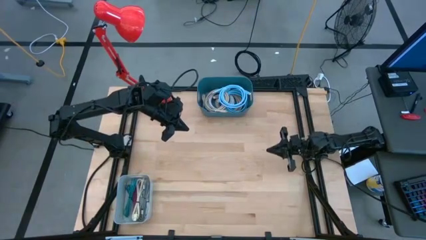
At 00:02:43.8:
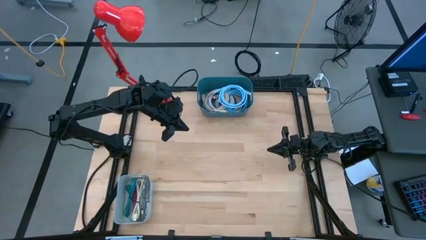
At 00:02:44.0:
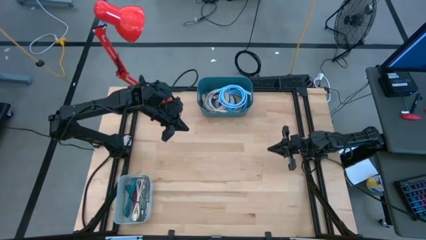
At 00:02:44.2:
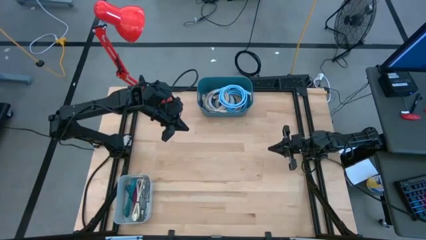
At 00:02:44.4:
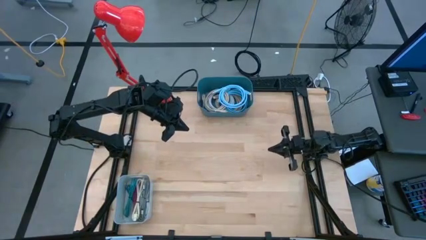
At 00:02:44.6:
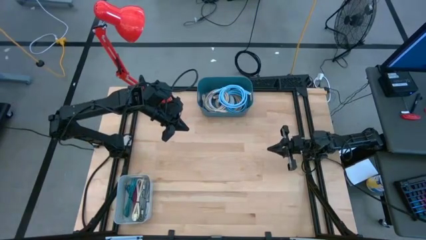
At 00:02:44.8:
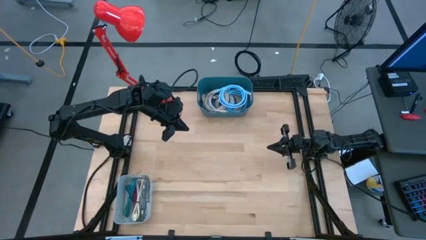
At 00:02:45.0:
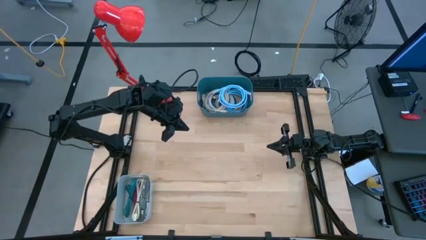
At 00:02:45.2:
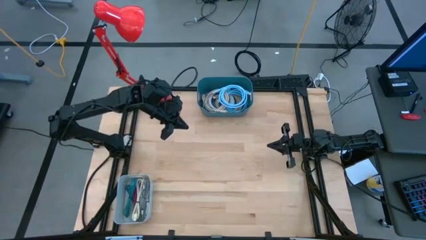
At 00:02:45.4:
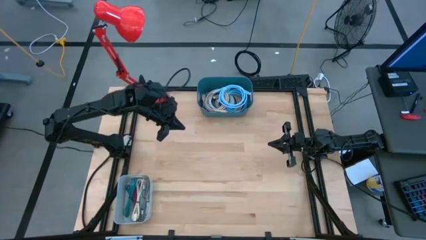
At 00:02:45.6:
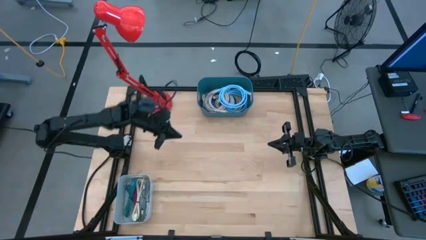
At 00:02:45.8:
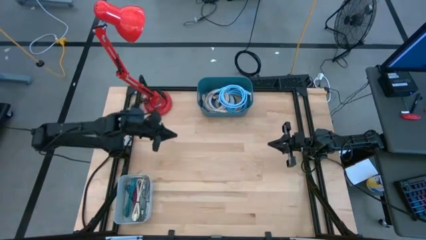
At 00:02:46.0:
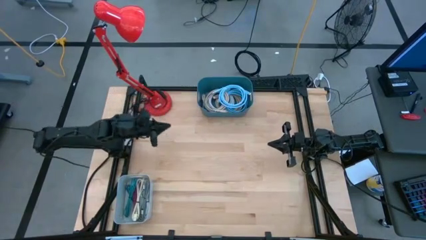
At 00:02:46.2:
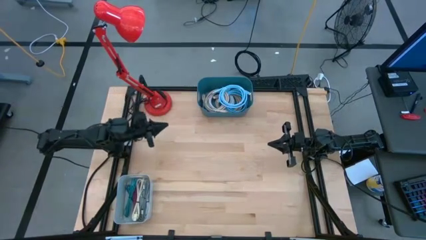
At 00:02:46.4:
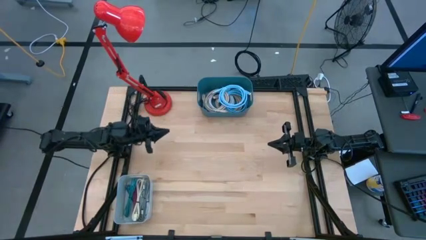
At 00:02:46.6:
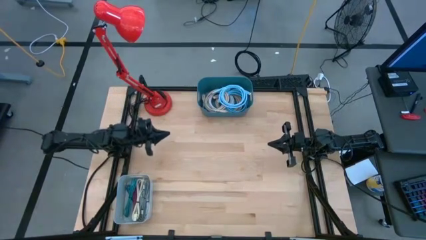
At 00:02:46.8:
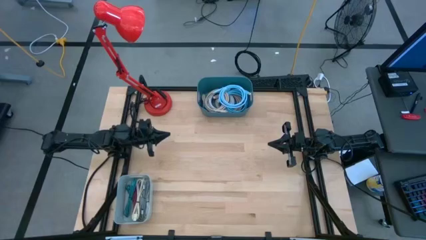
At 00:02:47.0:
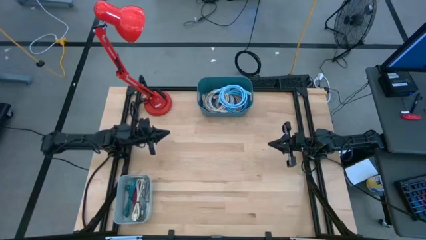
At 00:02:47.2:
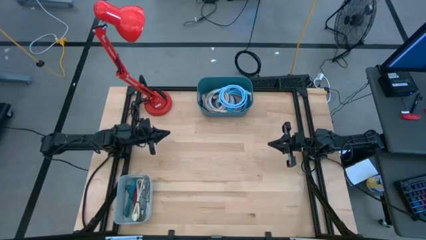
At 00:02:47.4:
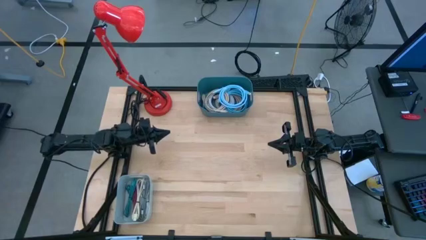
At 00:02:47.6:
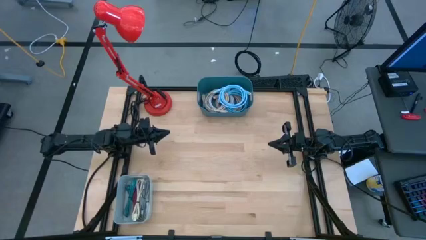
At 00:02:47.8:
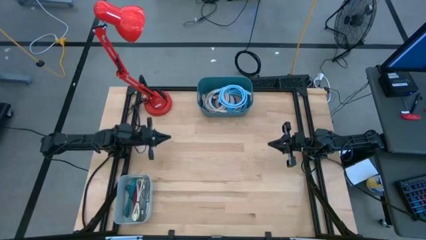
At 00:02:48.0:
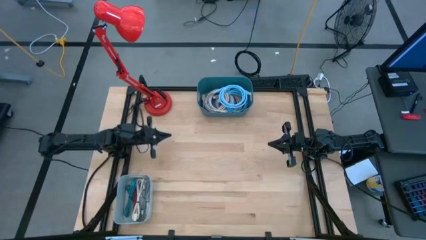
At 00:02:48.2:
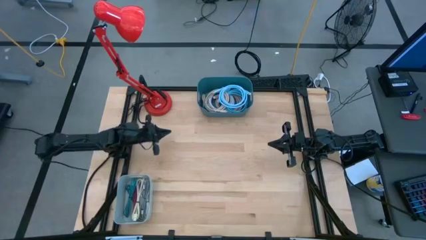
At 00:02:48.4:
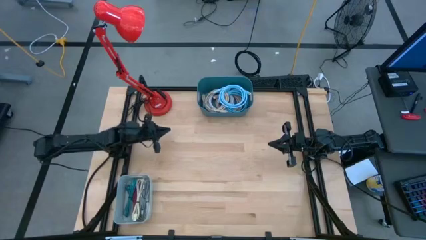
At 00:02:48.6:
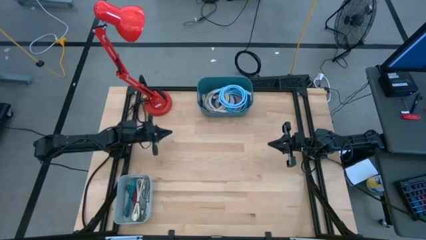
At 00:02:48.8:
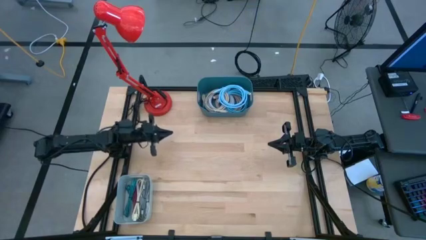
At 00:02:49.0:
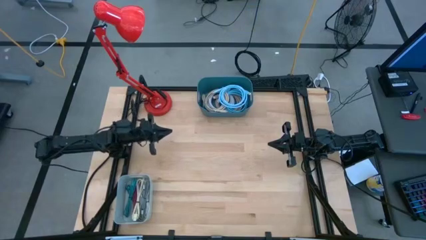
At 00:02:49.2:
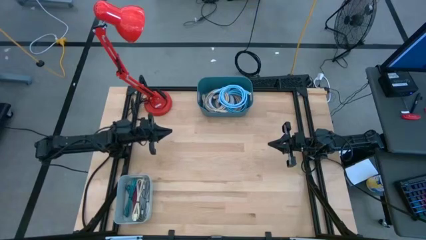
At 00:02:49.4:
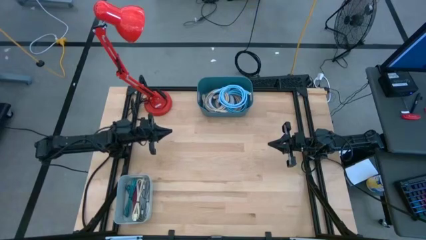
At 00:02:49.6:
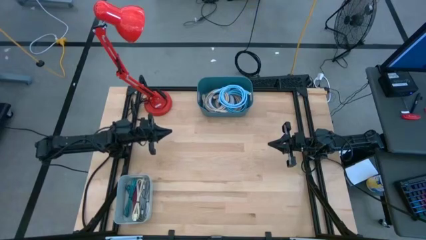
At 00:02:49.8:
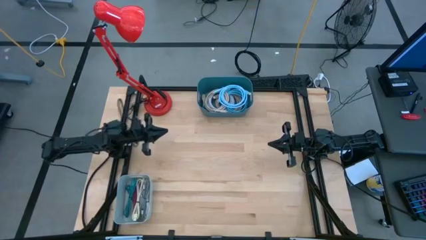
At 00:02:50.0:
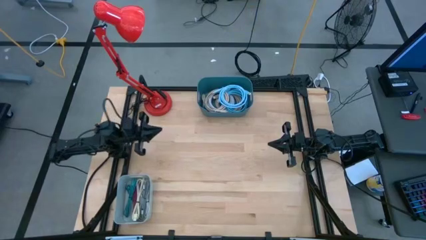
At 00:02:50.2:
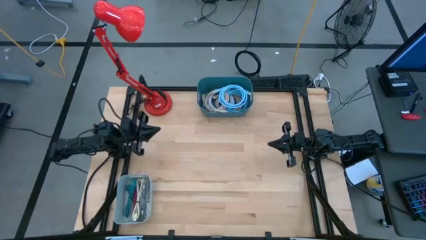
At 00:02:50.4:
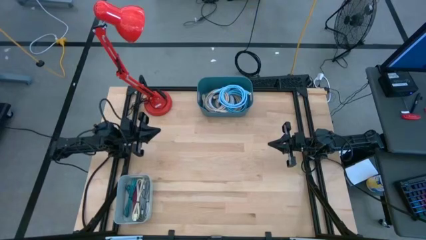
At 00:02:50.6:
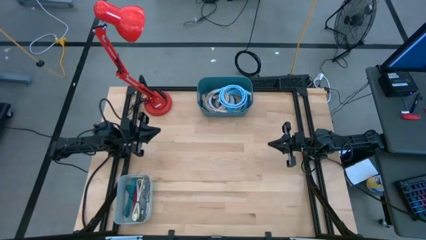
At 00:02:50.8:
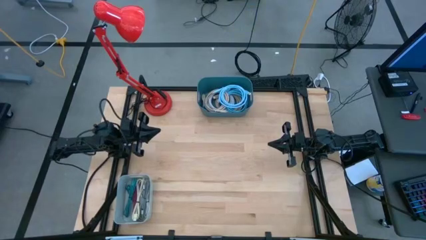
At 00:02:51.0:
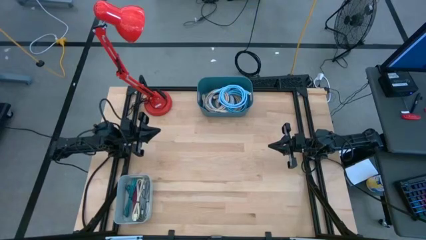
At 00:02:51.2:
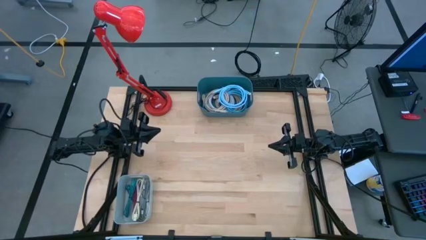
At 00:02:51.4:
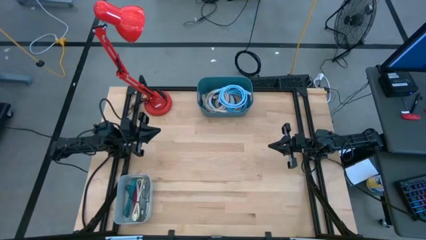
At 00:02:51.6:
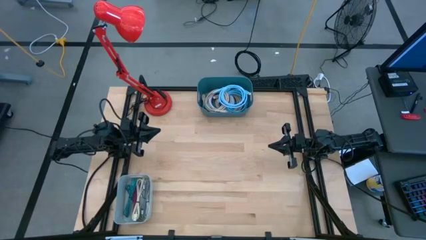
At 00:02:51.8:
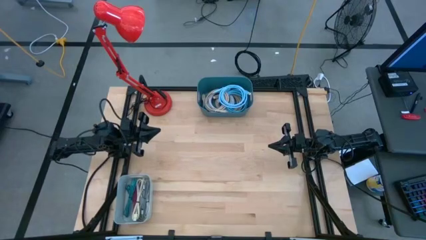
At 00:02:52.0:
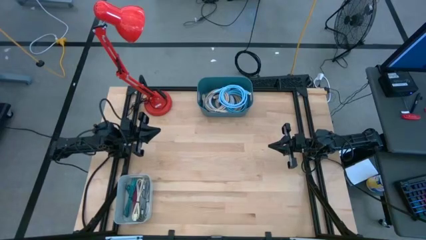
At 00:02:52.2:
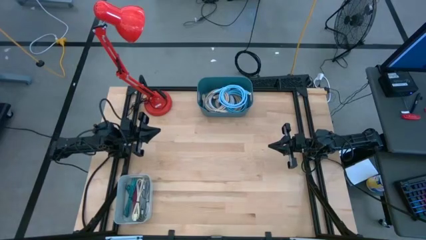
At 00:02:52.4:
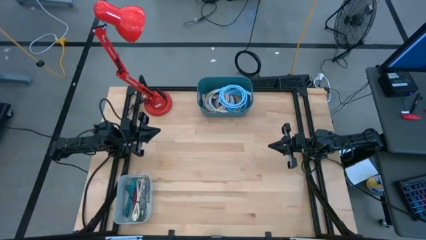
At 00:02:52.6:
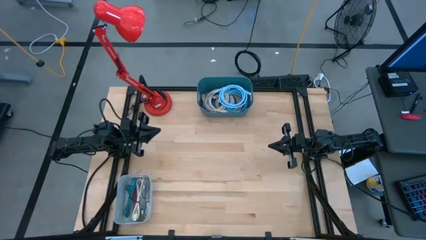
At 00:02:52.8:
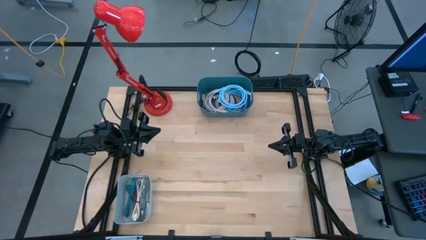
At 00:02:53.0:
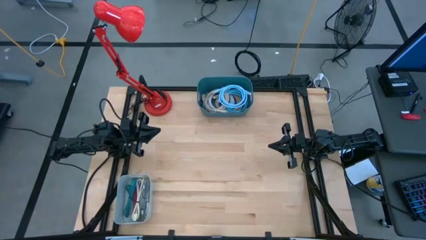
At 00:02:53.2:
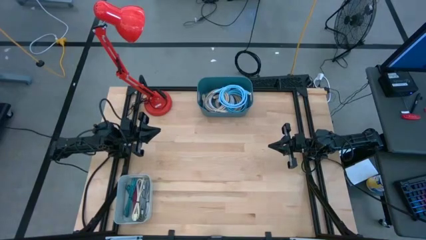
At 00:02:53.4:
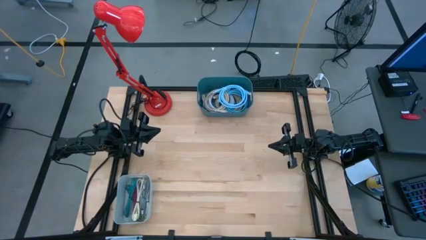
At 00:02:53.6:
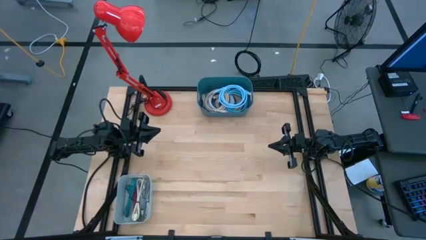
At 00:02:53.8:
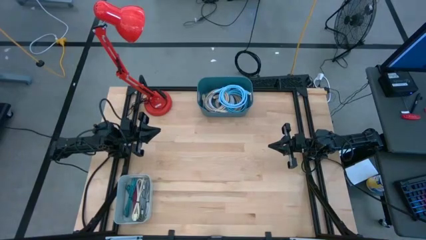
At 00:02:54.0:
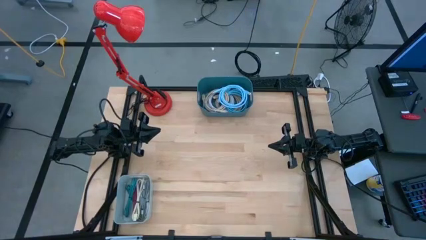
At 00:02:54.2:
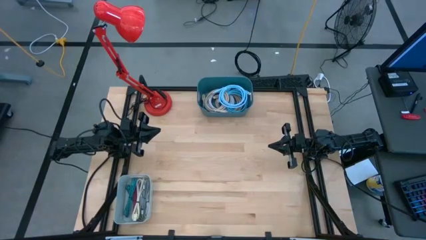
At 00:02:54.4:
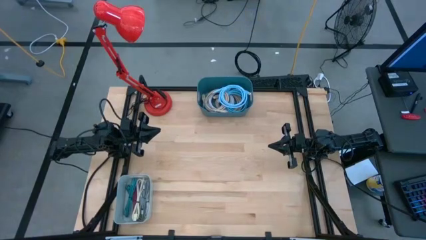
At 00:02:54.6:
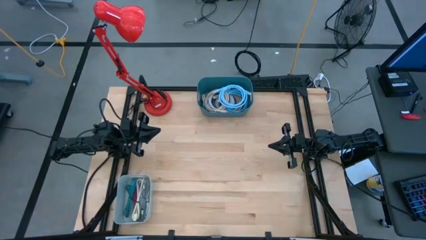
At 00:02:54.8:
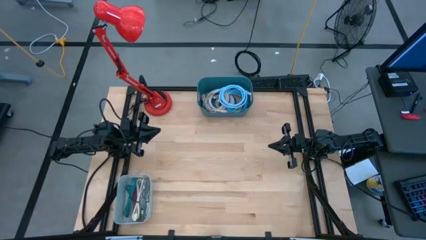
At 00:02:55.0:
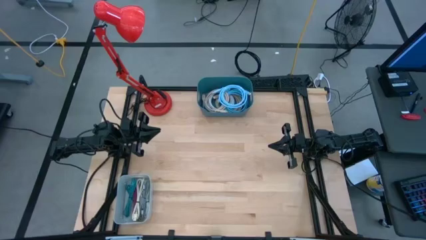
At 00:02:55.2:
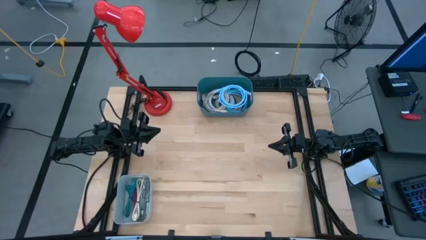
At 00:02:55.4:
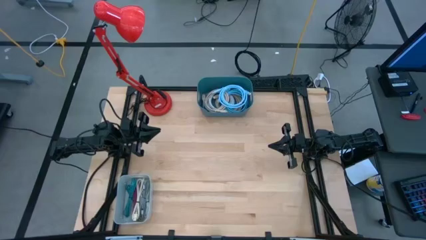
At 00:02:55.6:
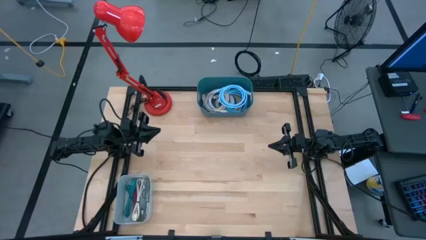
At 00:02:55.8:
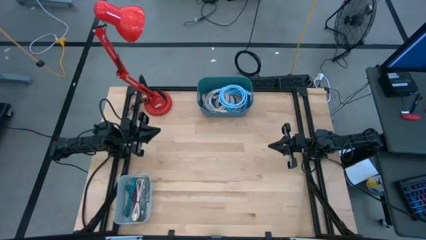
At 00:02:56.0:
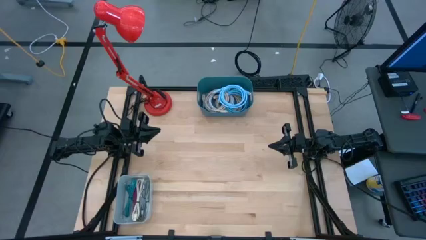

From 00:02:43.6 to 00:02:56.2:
Task: Pick & Place USB Port
Return to Home Position

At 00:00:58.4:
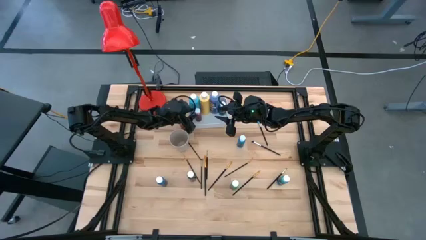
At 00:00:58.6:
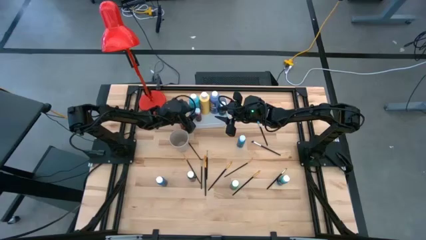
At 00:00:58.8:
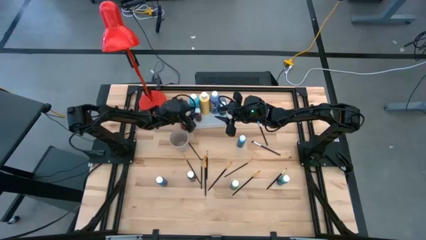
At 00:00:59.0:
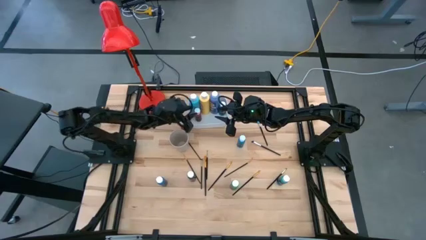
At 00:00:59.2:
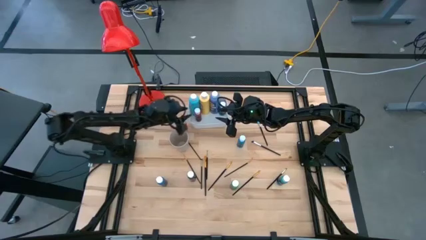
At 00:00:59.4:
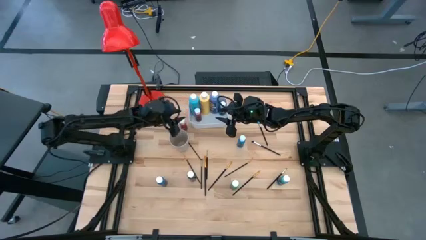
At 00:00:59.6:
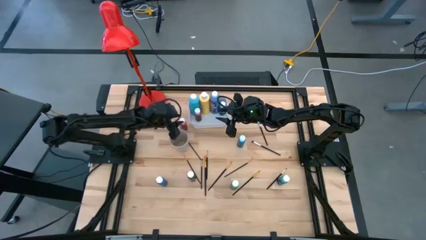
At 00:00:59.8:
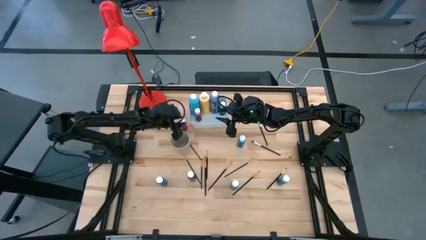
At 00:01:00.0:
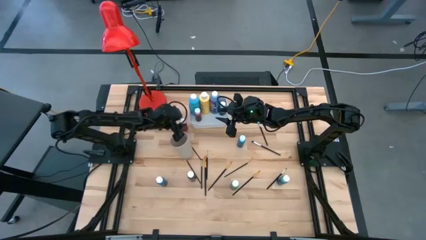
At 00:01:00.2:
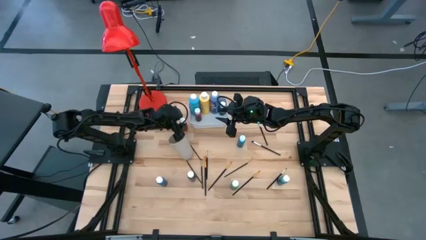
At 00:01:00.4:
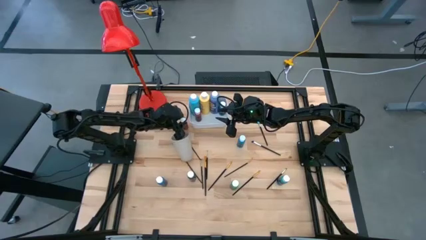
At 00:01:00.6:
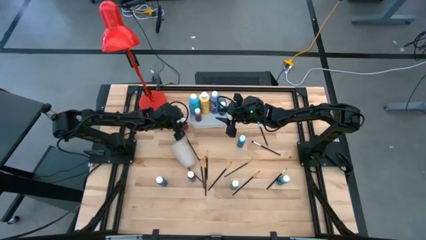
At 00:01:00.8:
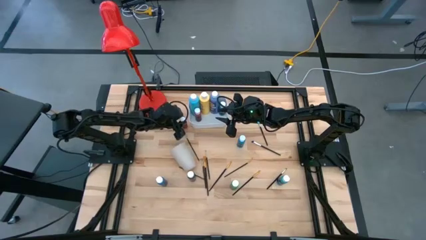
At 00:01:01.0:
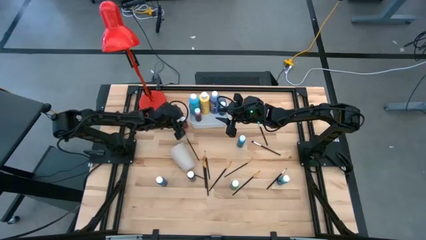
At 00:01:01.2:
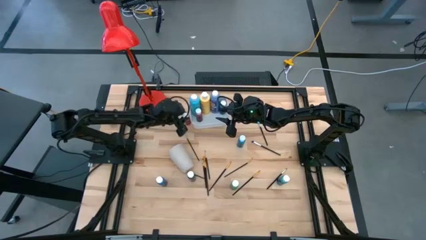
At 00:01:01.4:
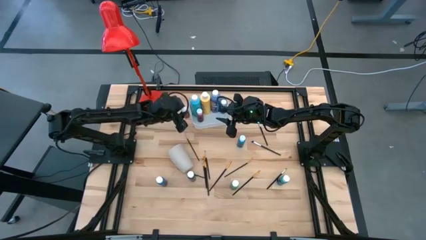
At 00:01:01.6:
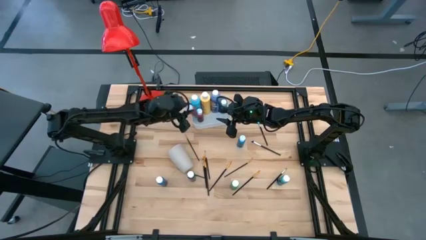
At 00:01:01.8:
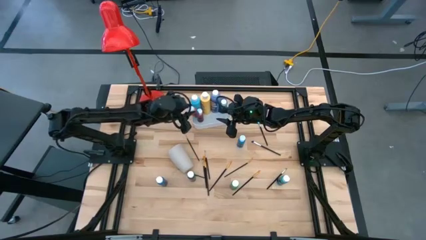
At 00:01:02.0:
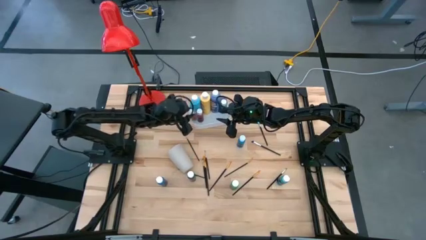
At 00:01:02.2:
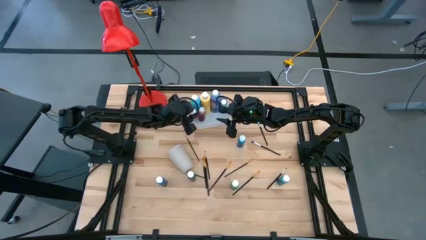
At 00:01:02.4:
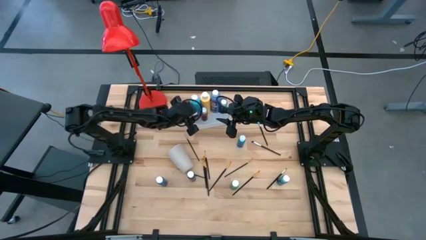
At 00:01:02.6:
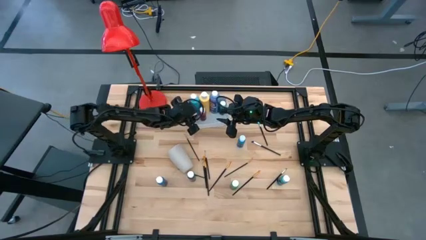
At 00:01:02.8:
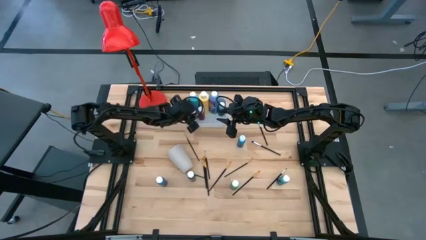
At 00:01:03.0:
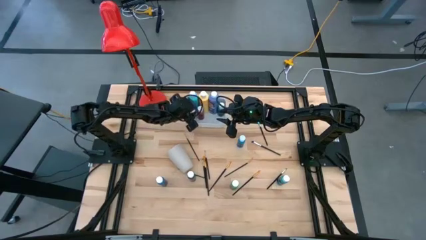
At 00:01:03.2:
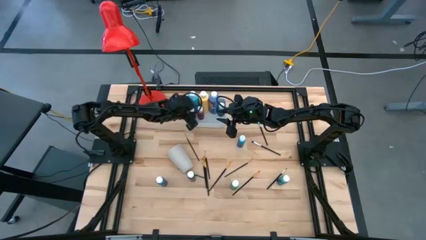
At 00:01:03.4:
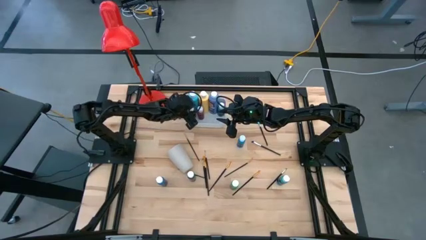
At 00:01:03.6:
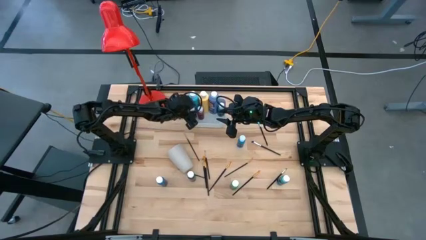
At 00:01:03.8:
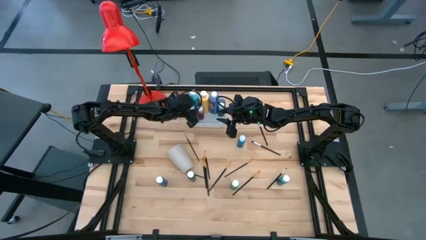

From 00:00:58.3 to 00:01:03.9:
Task: Pick & Place Paint Supplies
Put the red paint bottle into the white bin
